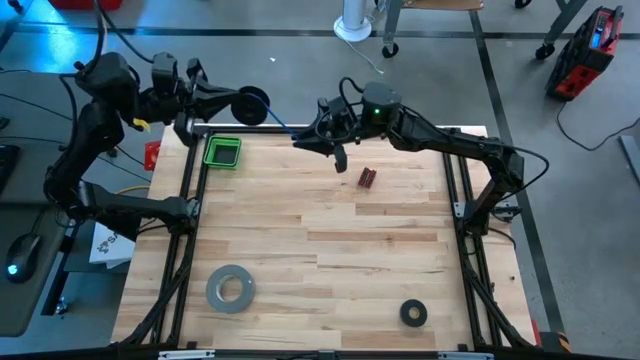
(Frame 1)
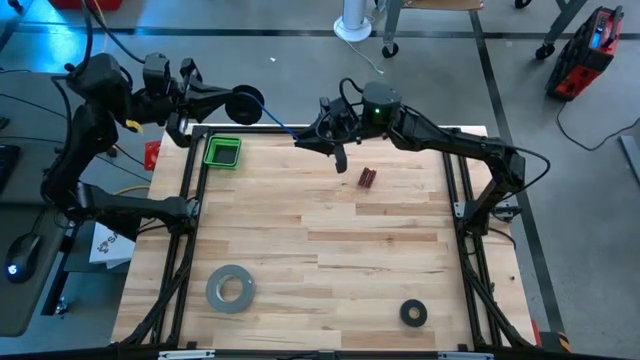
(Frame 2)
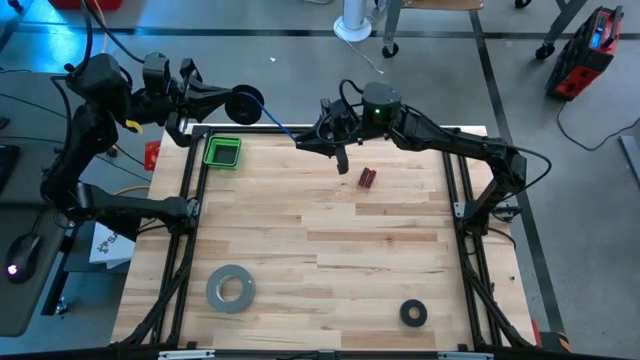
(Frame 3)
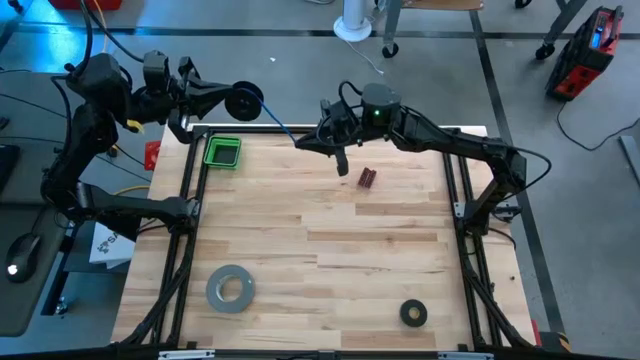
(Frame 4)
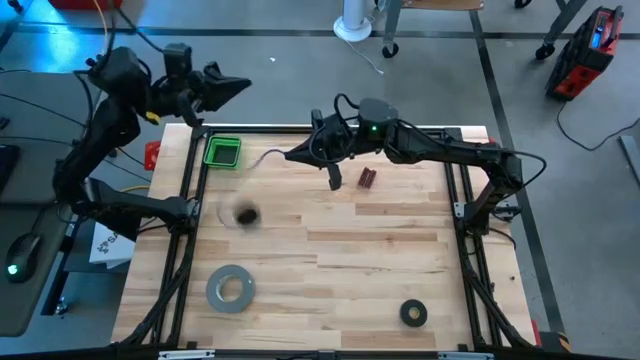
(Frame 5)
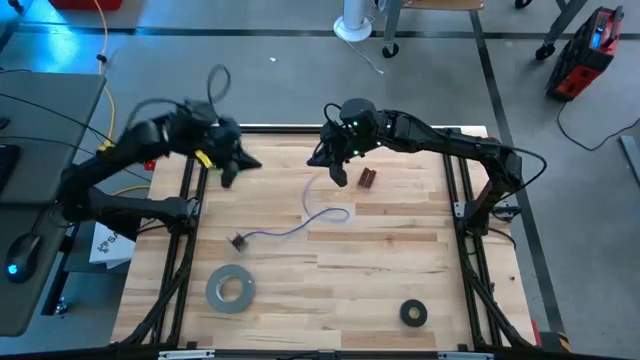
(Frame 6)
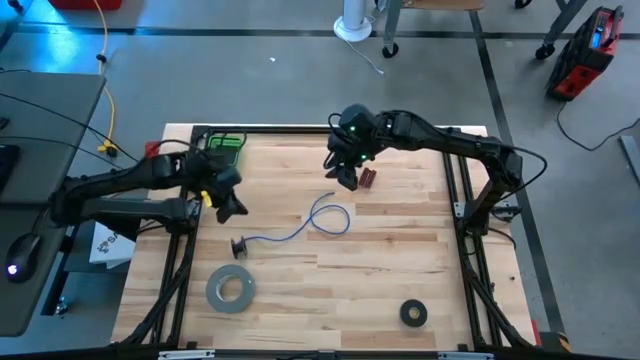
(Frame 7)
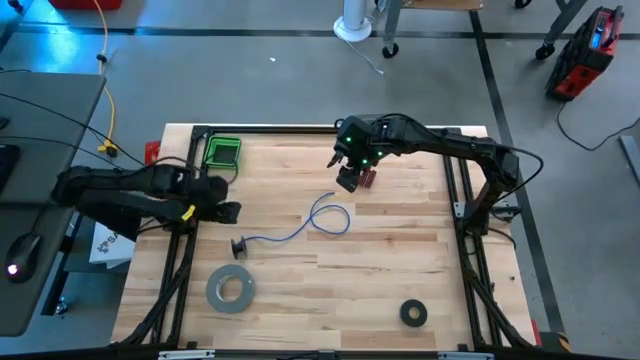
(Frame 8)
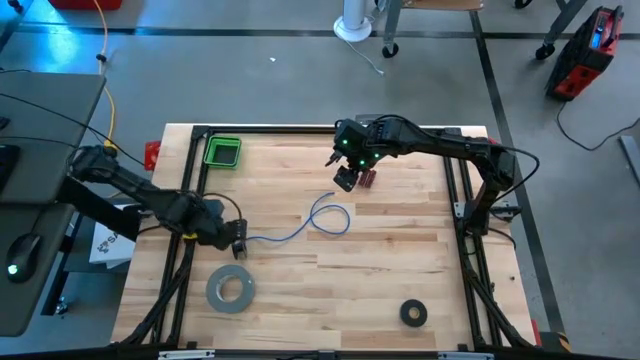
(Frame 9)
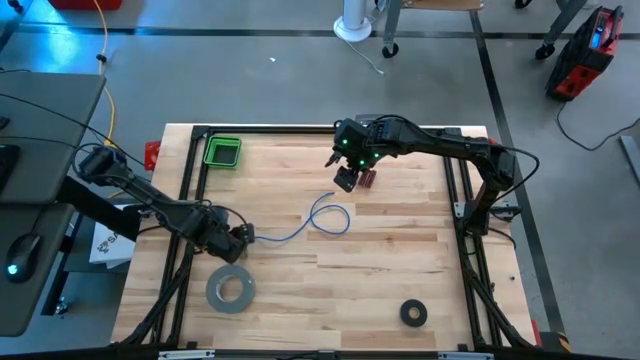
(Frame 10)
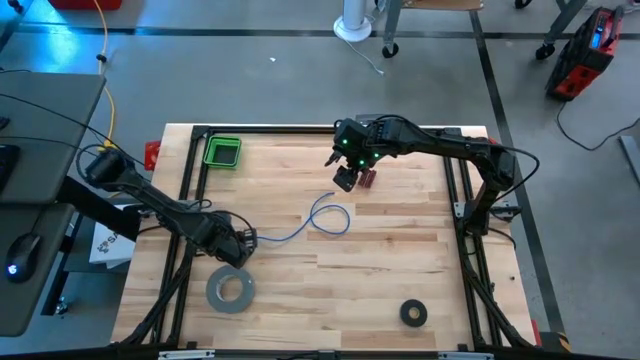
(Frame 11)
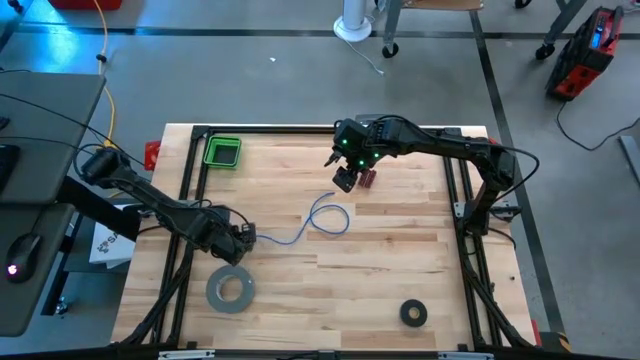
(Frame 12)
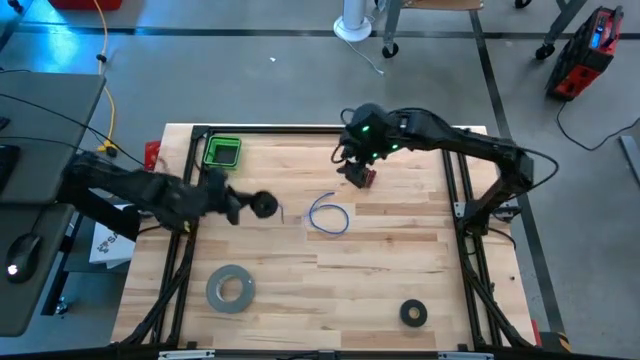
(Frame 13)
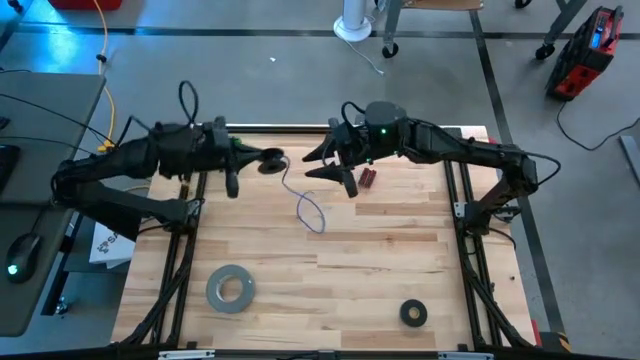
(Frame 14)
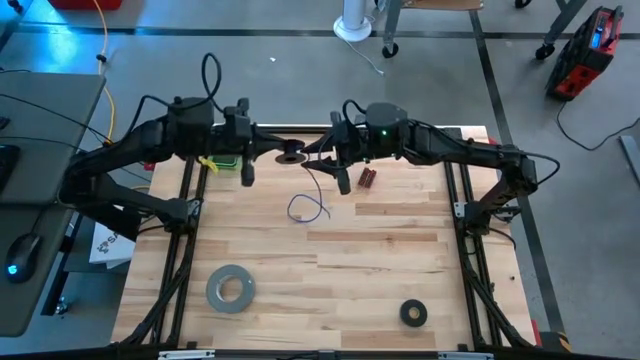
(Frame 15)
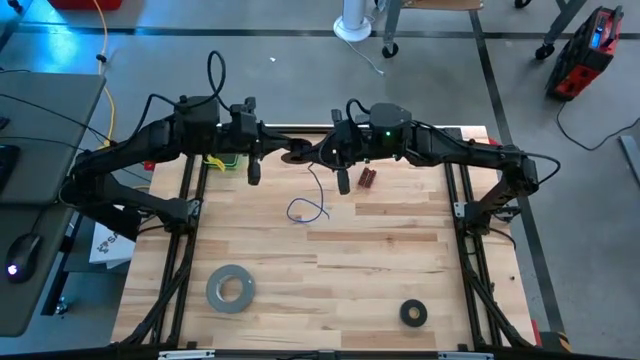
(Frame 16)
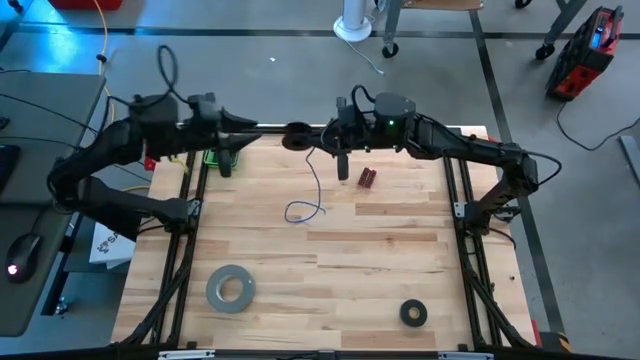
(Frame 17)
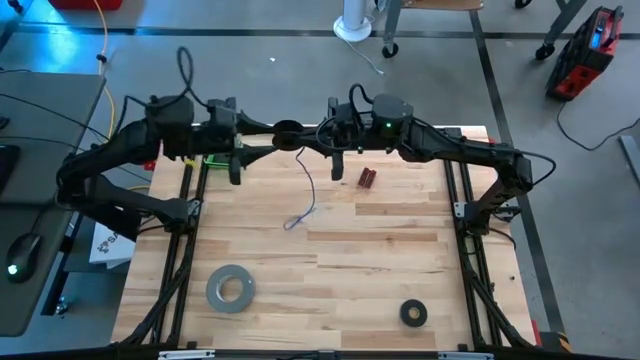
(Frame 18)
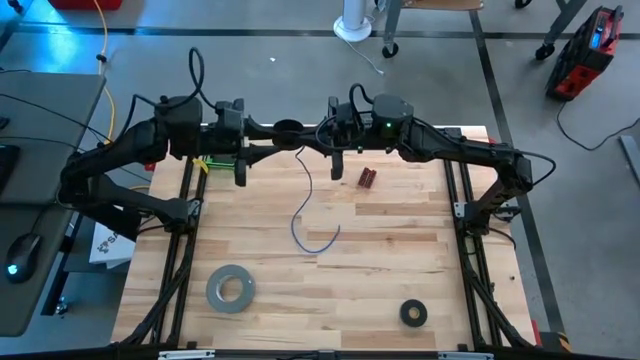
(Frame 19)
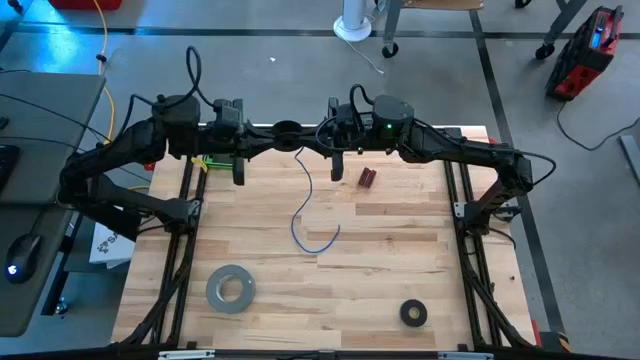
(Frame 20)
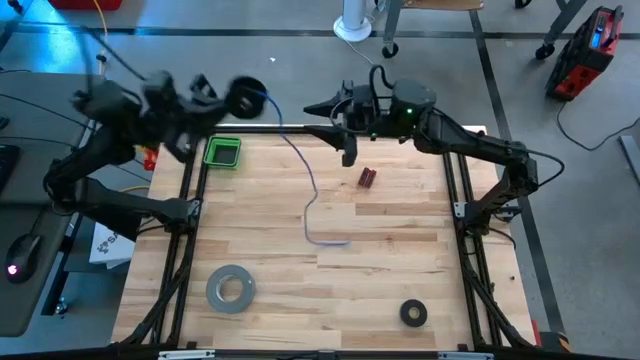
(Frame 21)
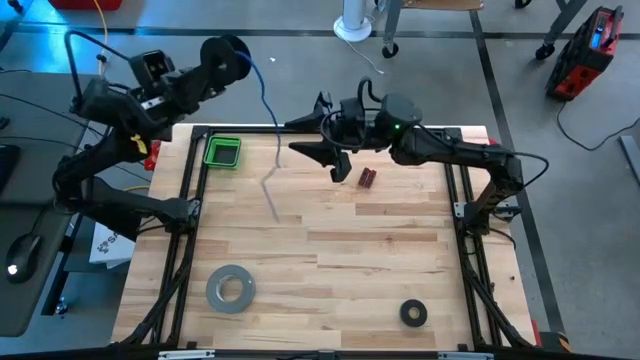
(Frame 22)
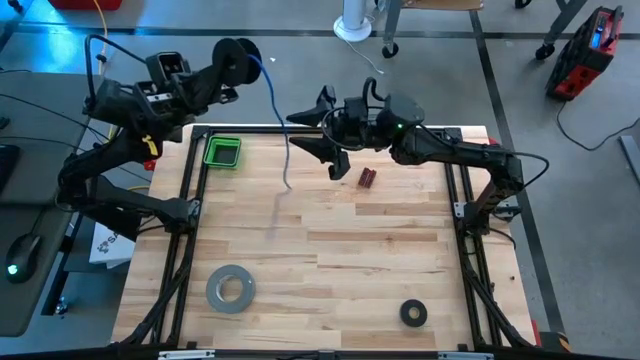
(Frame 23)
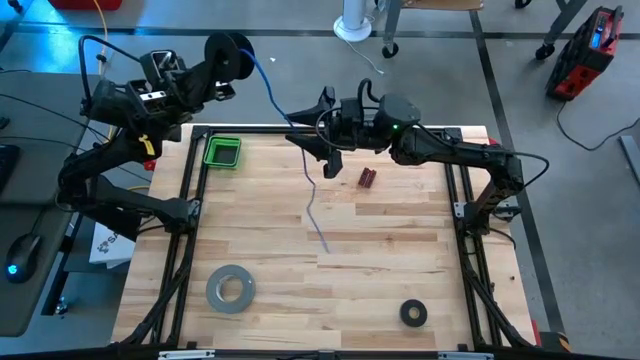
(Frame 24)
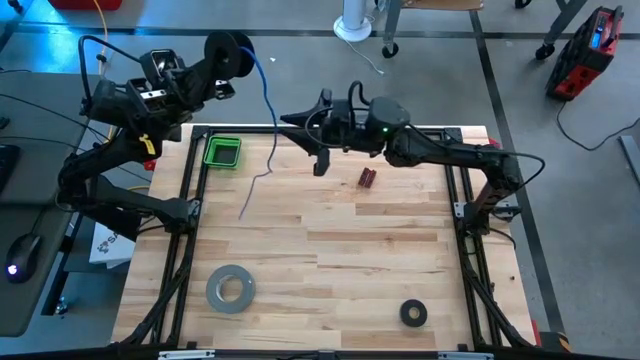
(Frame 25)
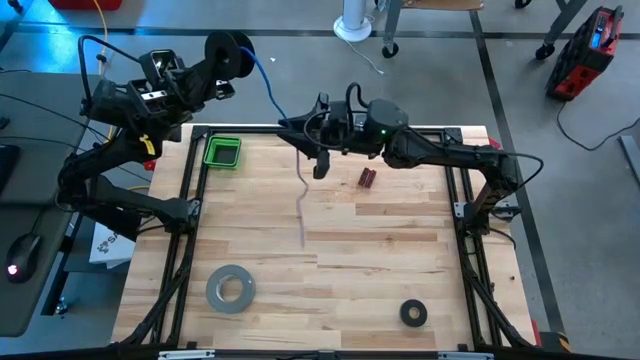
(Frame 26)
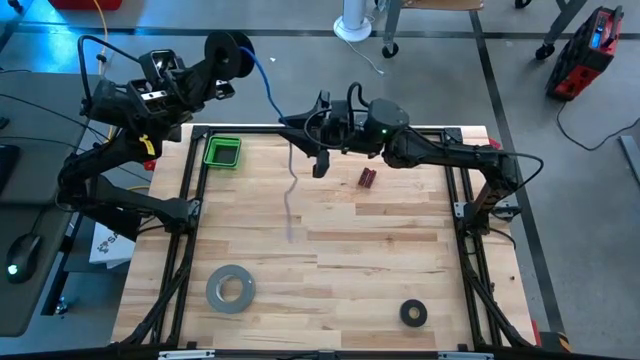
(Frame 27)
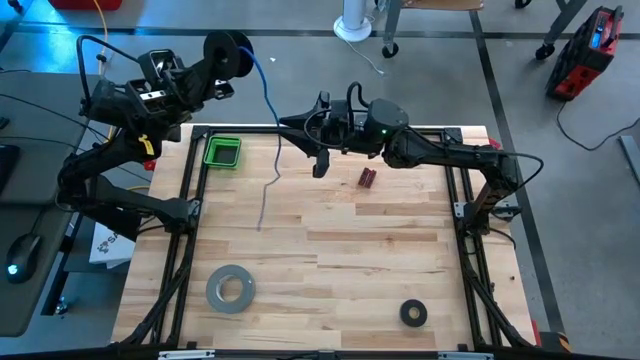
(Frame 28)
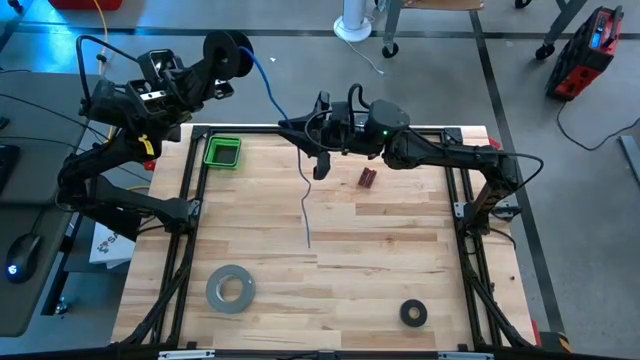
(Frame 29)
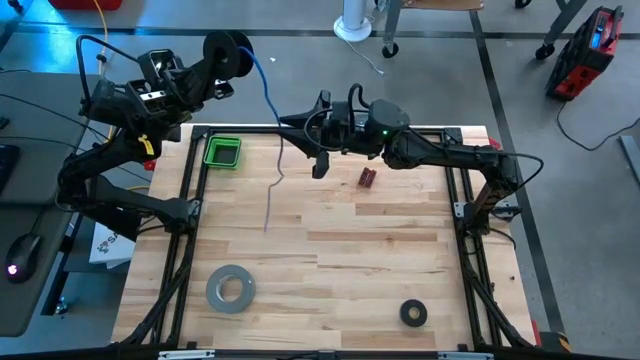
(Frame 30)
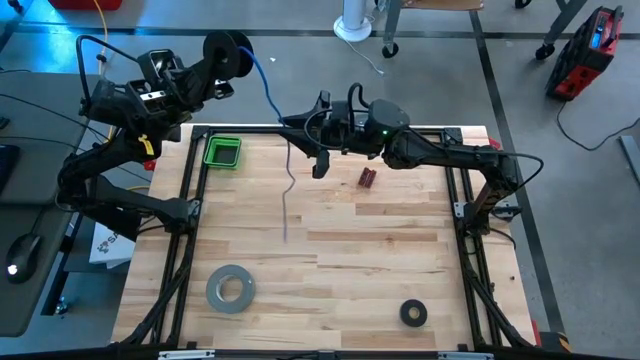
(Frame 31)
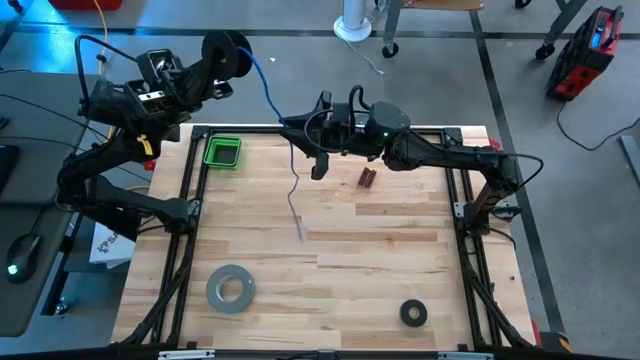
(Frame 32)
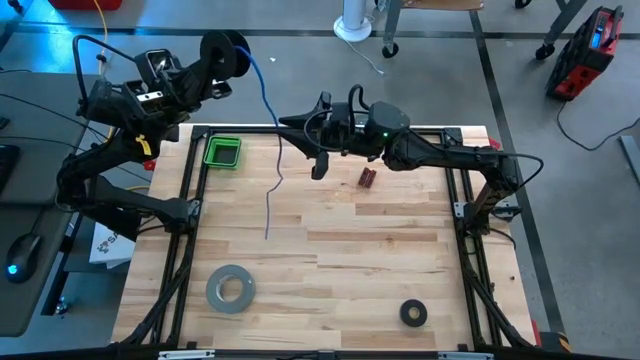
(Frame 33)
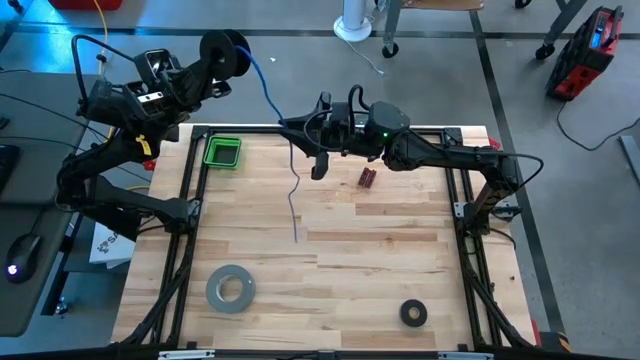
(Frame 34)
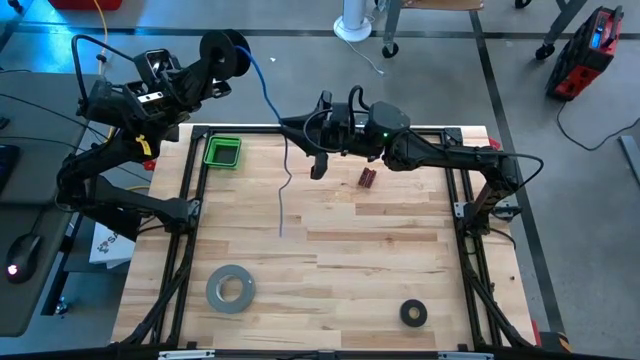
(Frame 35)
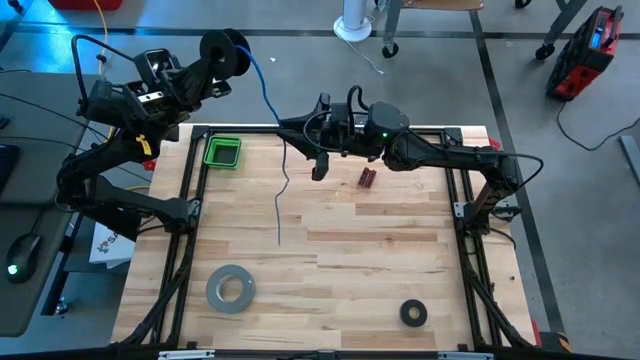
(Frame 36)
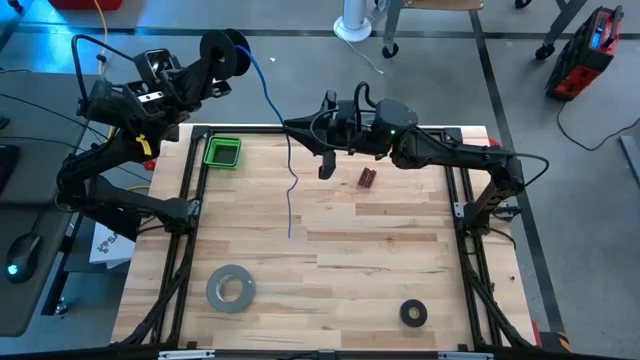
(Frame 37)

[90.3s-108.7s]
Task: Coil cords
Coil the blue wire onto the spool

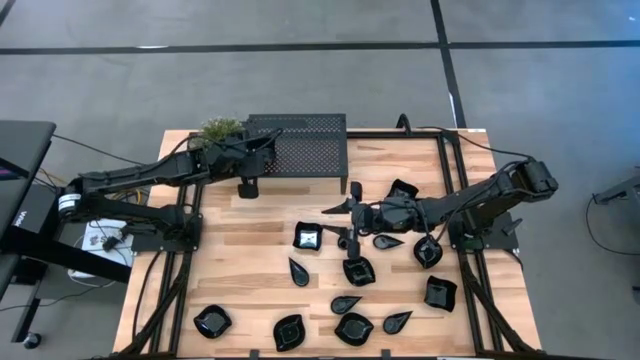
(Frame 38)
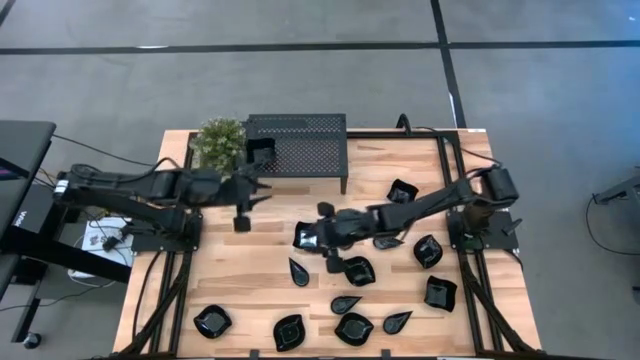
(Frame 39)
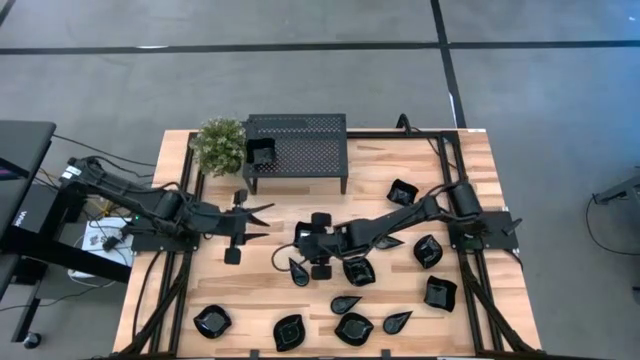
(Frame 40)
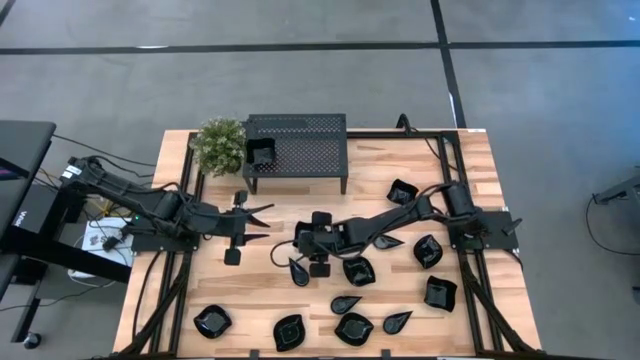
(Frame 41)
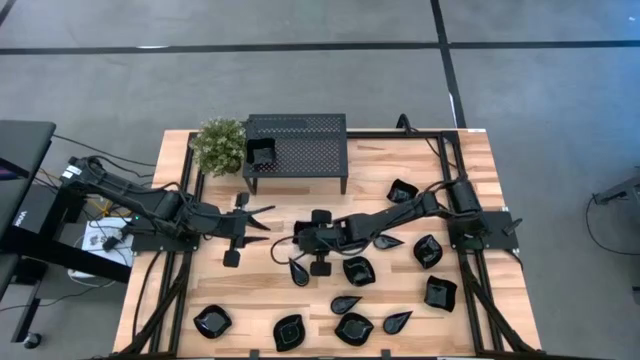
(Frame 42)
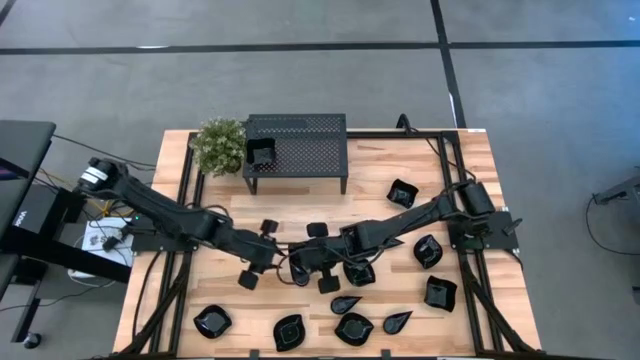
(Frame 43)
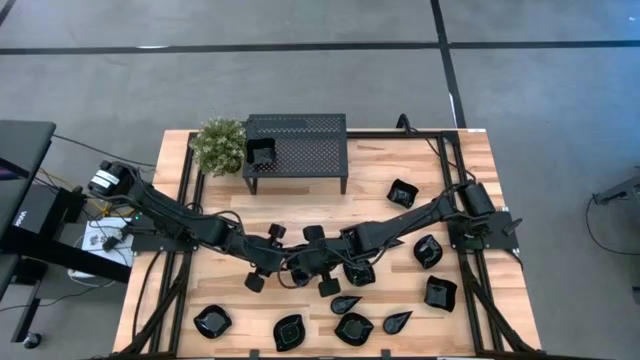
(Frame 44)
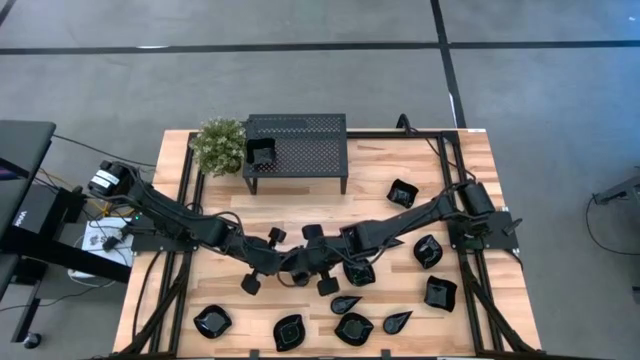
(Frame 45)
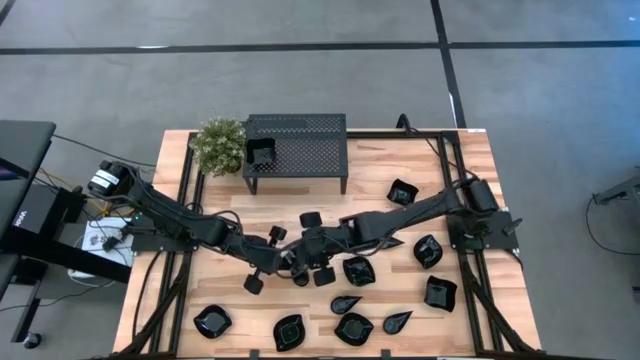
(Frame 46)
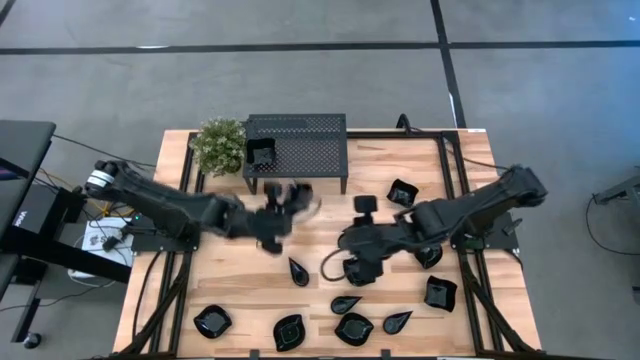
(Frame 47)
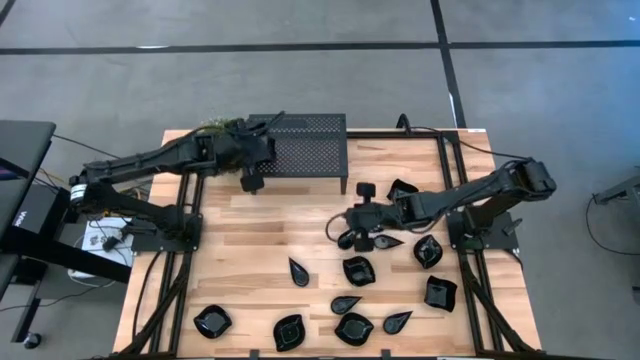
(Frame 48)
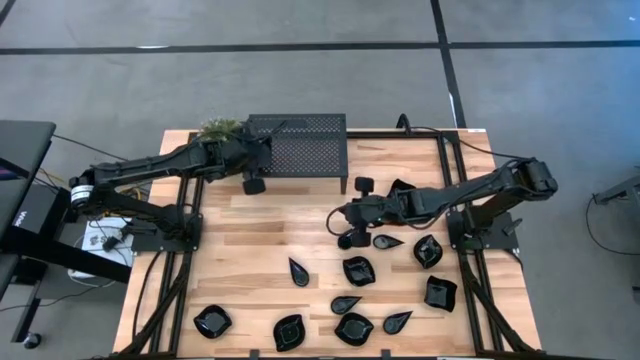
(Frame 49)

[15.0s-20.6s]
Task: Pick & Place Mini shaped plates
Stack the distorted square plate on top of the distorted square plate on the shelf
